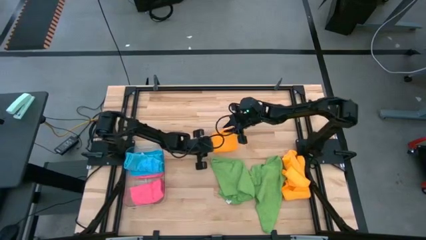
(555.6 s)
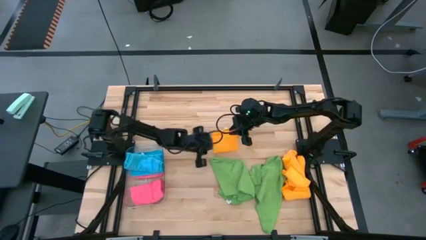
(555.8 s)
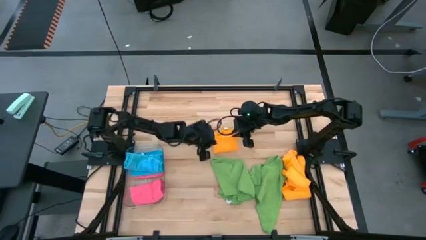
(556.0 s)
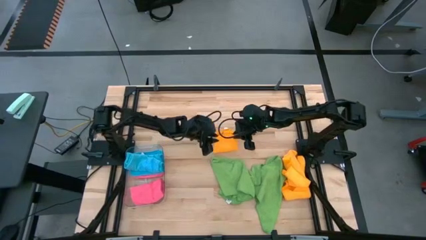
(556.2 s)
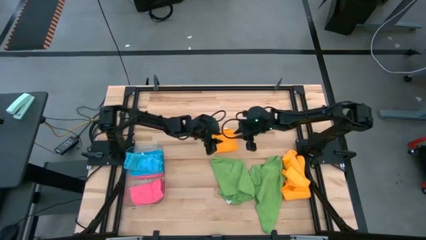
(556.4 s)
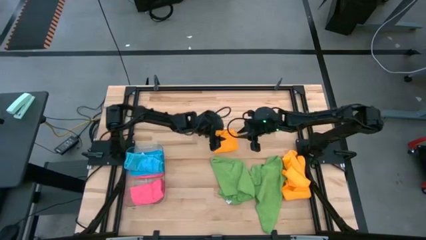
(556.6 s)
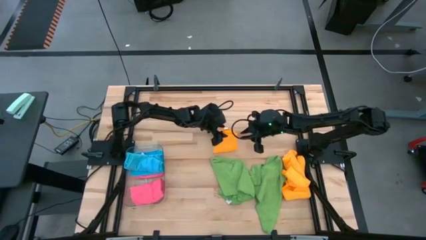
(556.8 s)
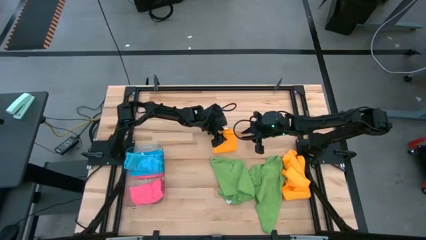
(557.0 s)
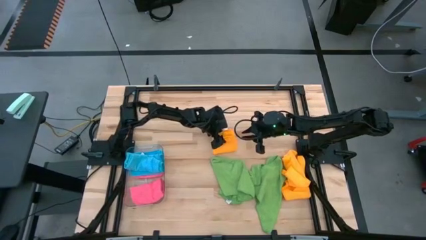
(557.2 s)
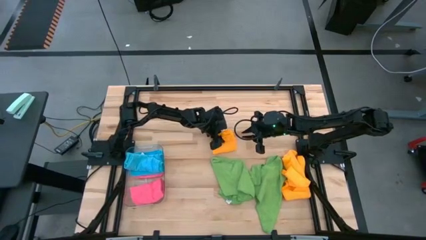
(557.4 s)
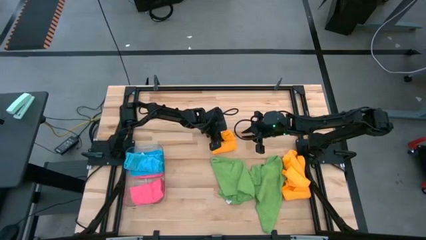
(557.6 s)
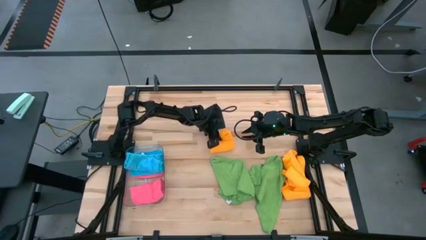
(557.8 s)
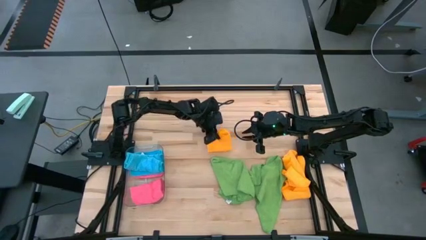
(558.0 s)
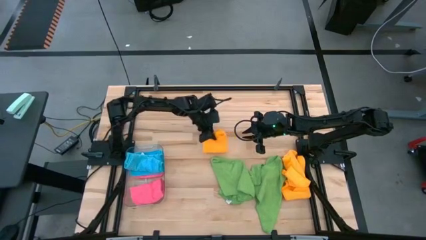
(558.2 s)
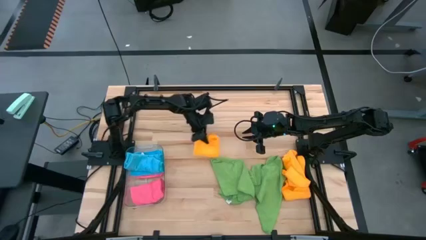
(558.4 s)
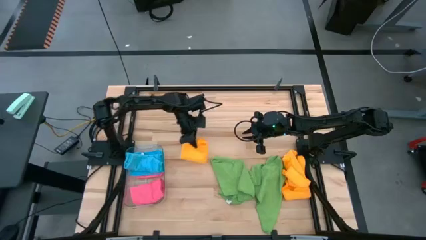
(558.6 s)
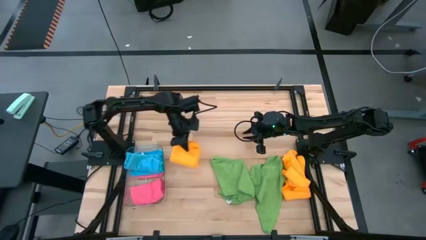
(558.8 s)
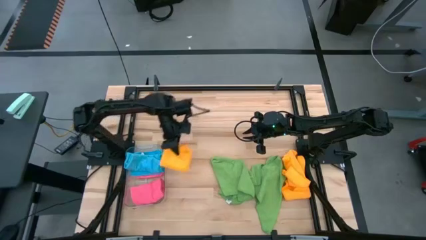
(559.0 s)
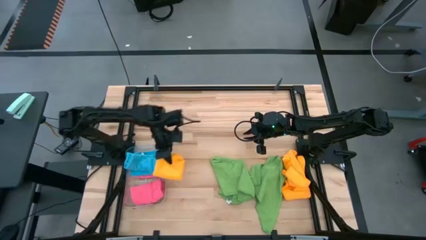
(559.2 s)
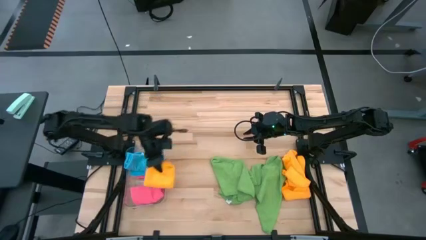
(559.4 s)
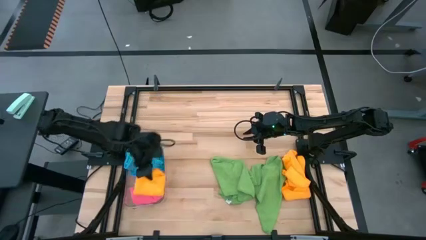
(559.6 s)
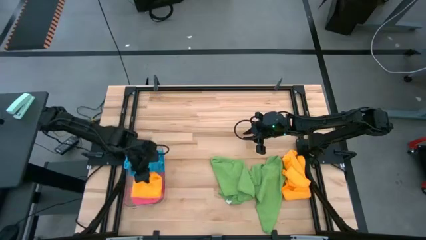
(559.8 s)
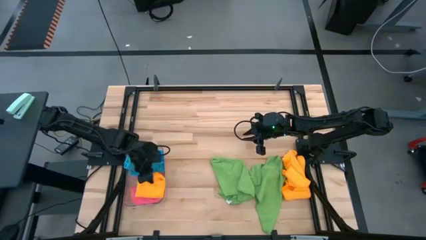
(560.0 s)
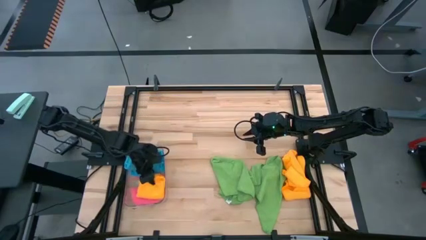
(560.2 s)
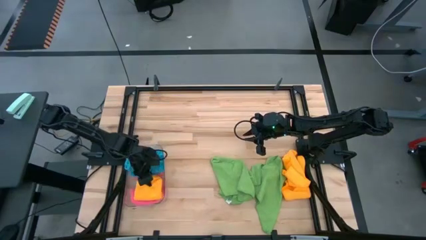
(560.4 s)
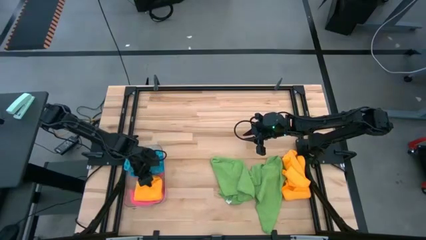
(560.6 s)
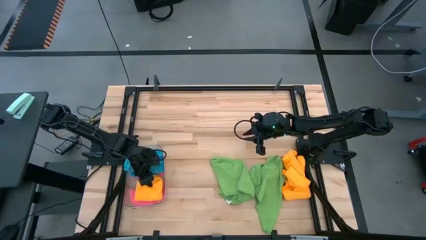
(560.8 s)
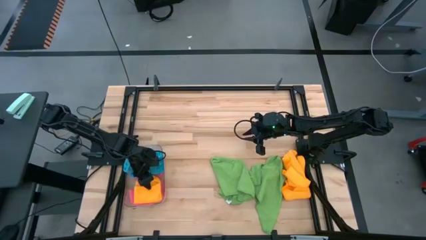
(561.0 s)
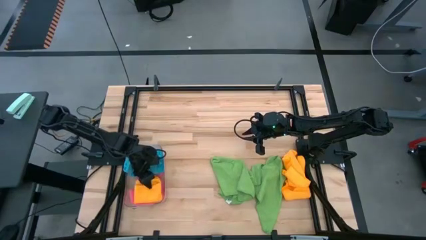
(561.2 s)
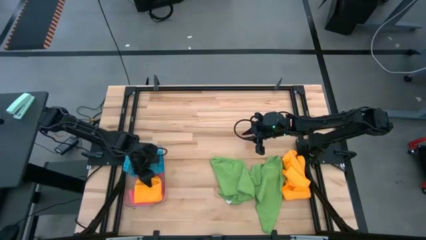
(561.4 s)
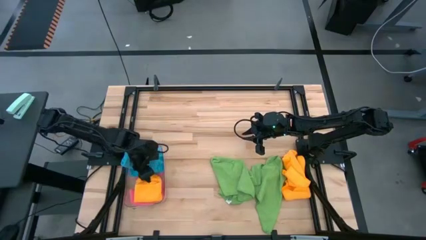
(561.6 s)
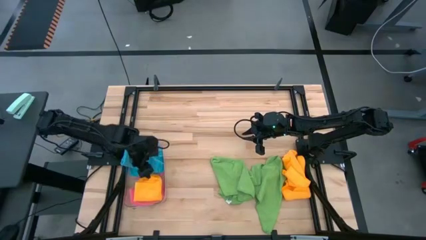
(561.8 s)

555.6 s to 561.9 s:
Task: Fold microfiber towels
Put the left yellow microfiber cloth into the transparent bin

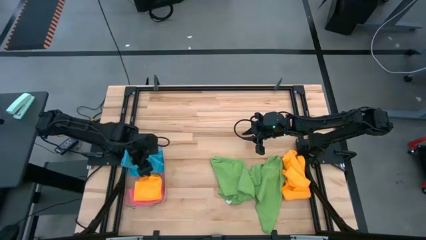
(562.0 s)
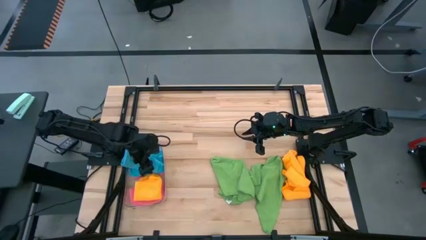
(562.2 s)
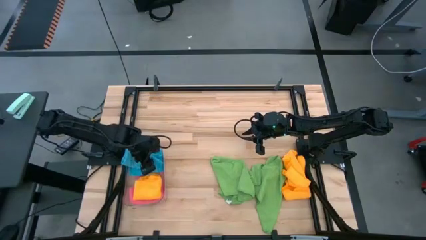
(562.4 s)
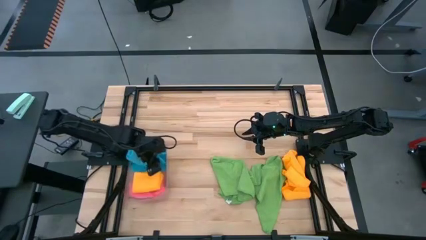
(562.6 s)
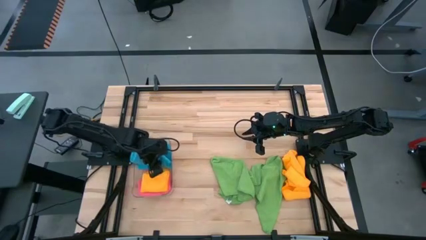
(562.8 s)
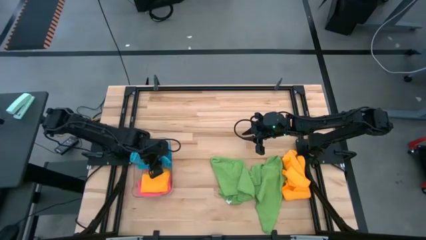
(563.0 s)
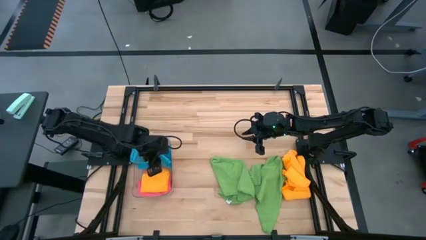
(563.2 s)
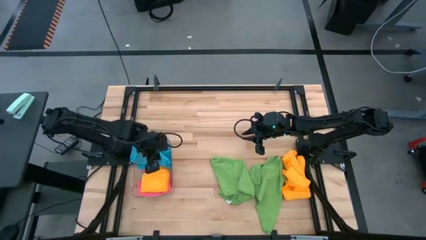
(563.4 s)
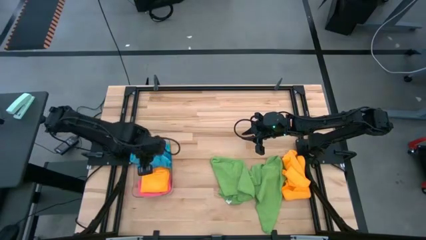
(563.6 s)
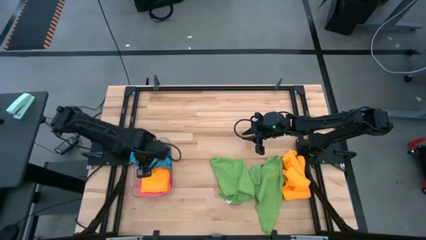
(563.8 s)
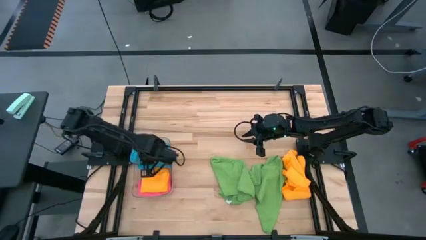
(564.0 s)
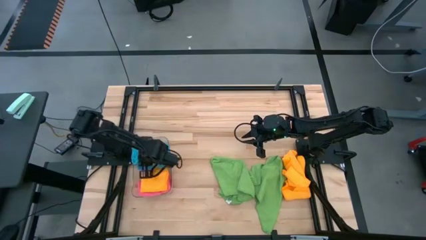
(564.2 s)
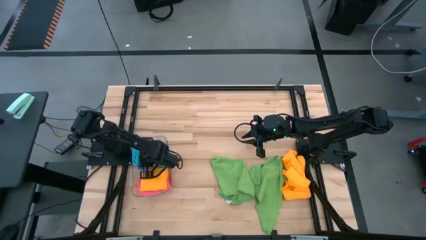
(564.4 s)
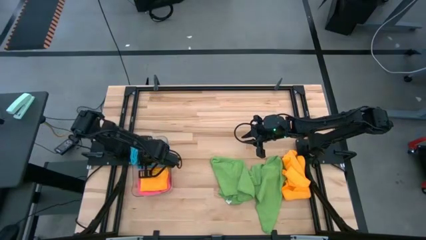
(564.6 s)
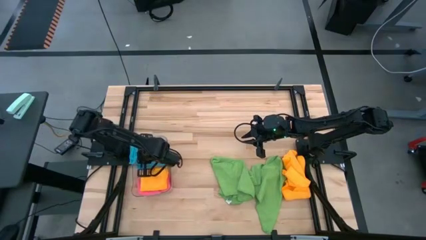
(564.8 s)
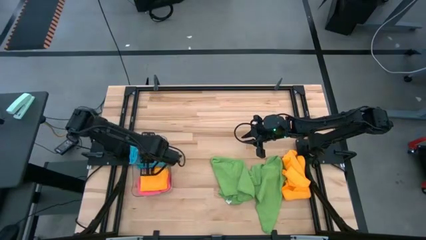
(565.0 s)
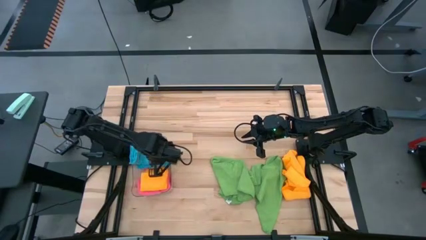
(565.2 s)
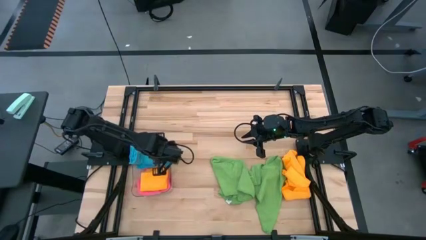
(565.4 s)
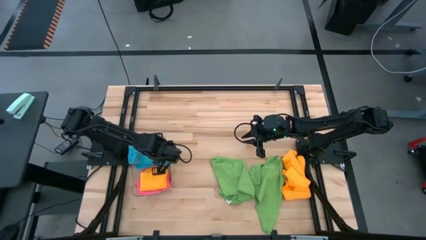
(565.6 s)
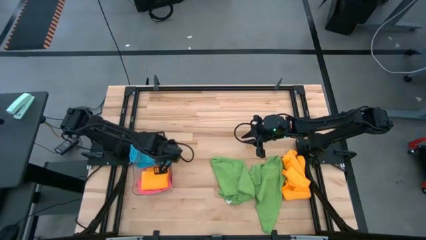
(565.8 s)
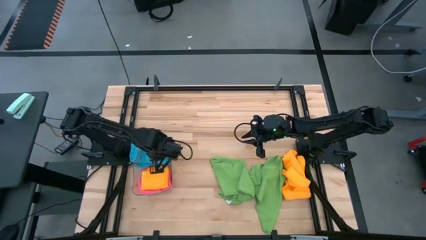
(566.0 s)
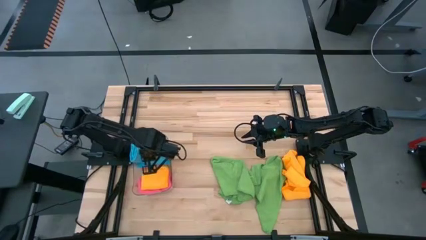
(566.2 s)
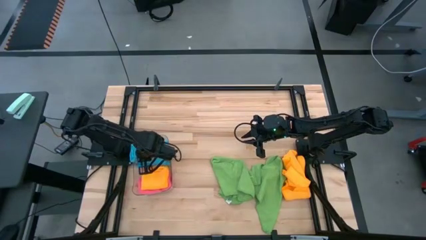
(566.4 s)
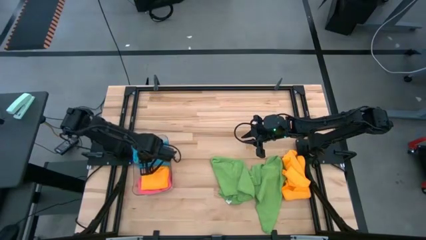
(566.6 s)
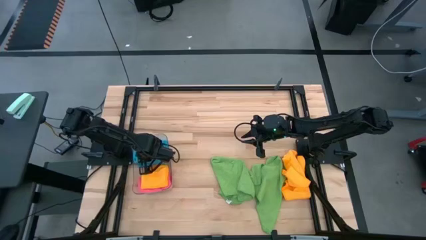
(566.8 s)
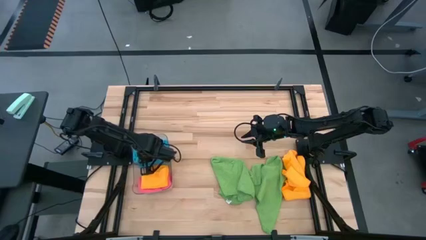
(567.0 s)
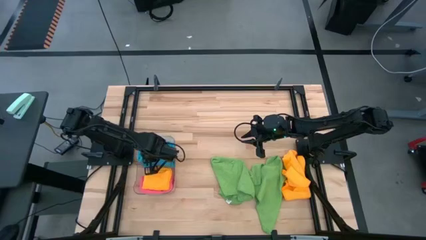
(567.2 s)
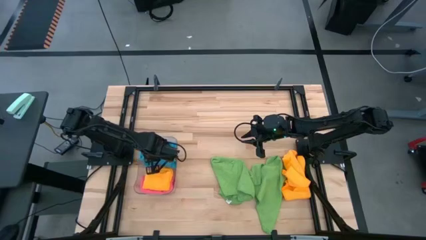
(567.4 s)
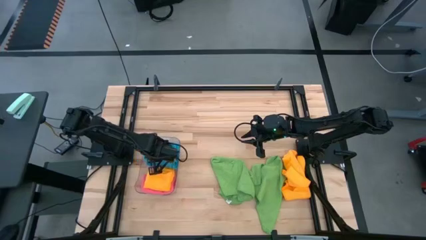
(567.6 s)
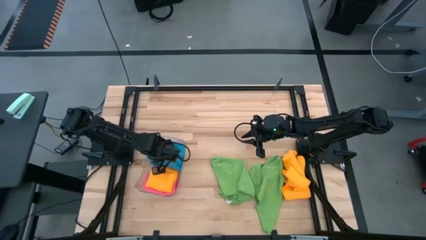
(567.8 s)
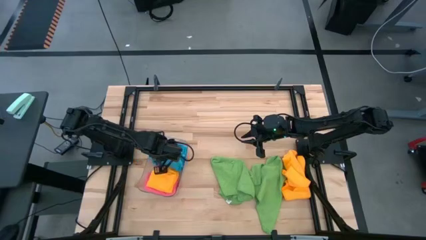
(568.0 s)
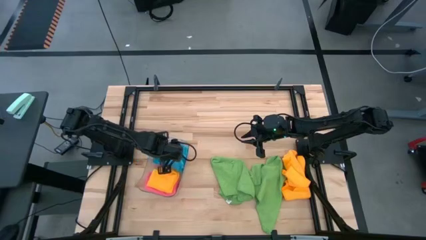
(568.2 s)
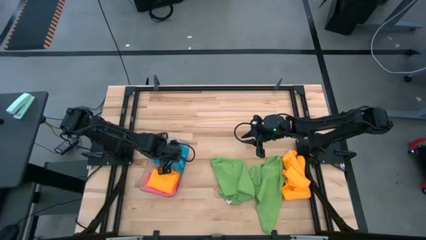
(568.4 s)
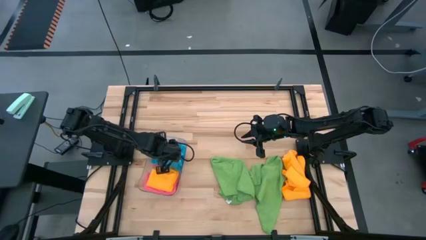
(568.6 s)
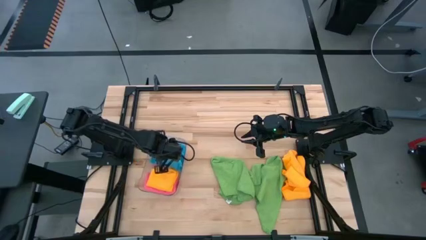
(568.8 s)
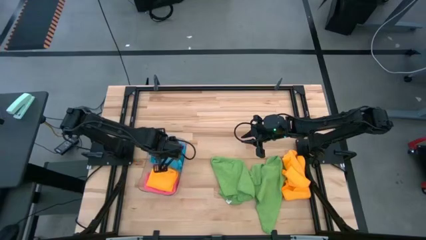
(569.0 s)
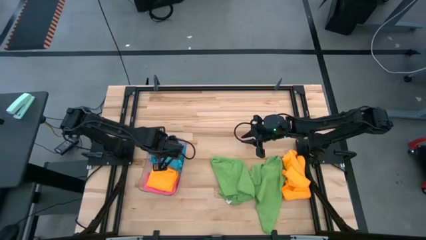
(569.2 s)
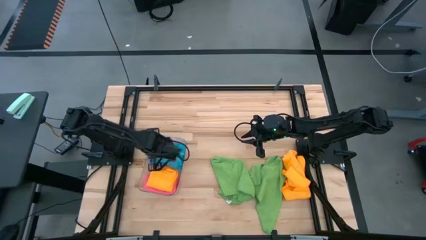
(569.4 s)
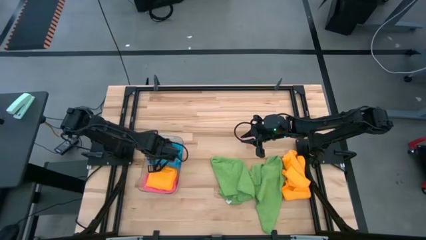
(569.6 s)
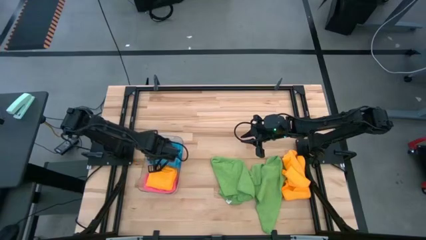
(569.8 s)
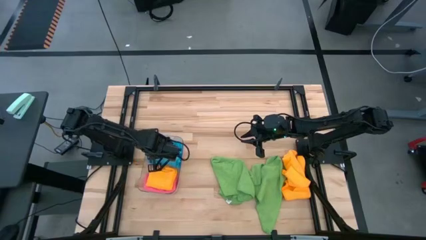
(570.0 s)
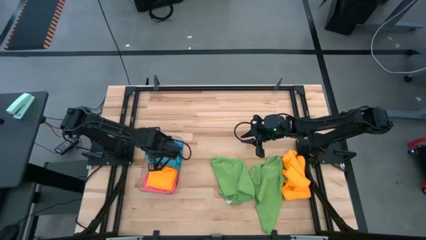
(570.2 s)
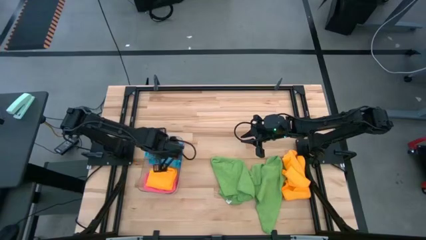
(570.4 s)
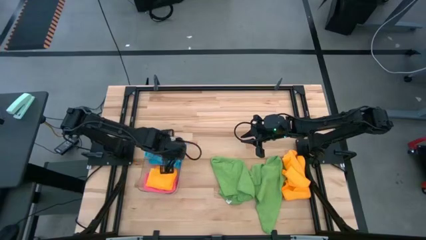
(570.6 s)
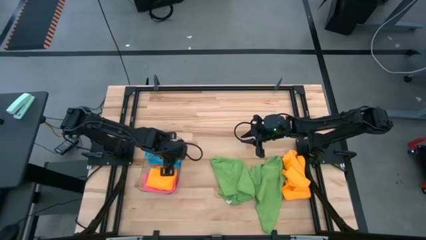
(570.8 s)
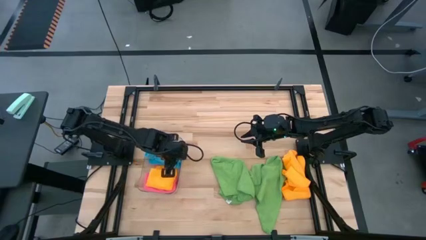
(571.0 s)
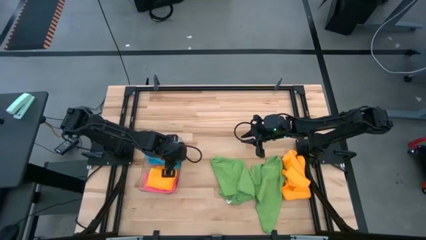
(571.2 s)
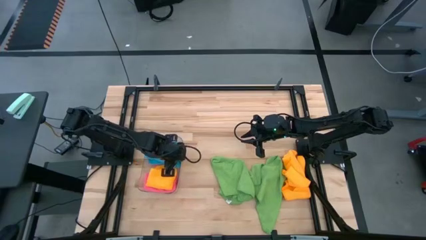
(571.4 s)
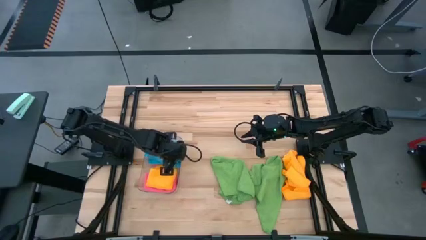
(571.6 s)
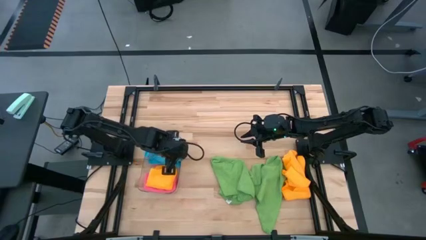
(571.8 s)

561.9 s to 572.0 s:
Adjust the blue microfiber cloth
